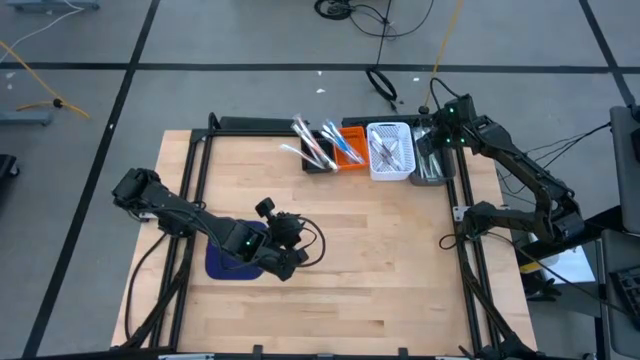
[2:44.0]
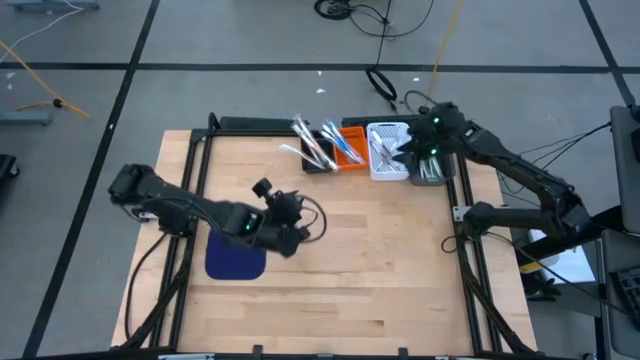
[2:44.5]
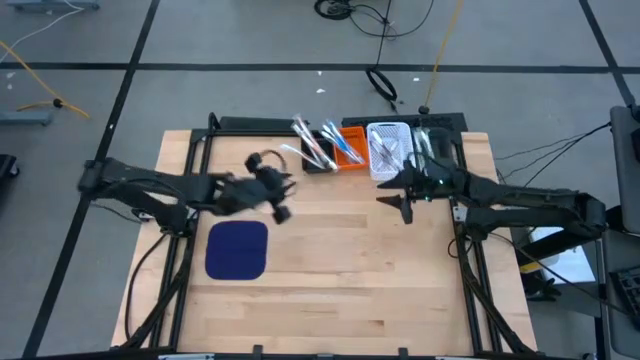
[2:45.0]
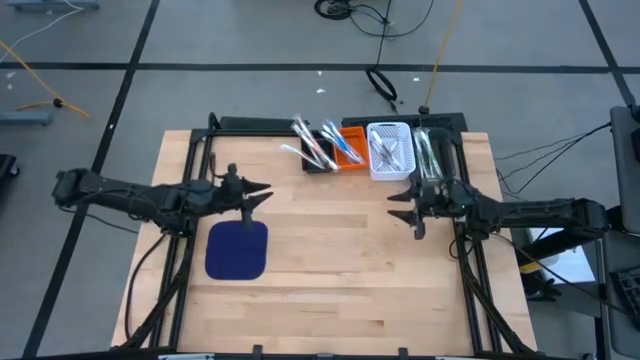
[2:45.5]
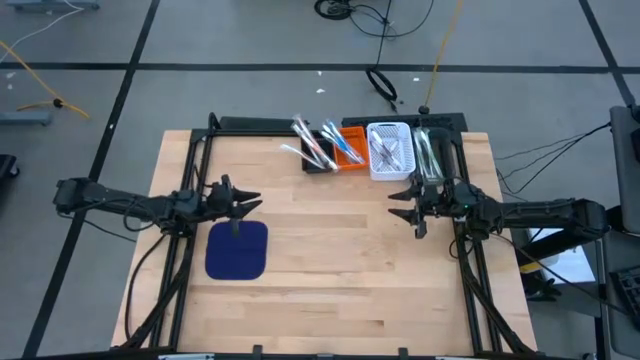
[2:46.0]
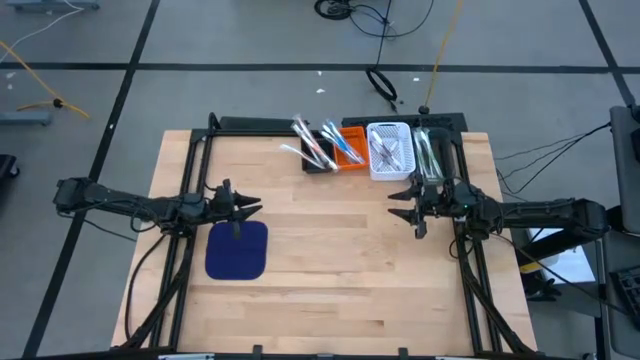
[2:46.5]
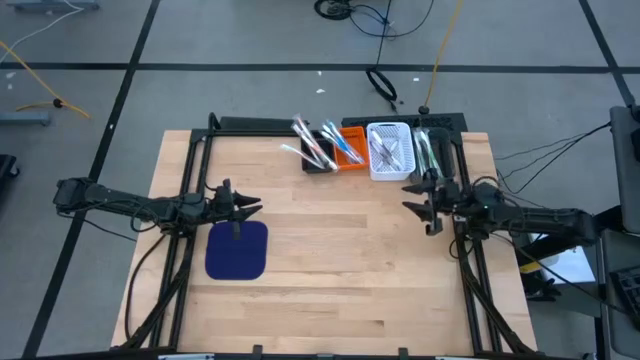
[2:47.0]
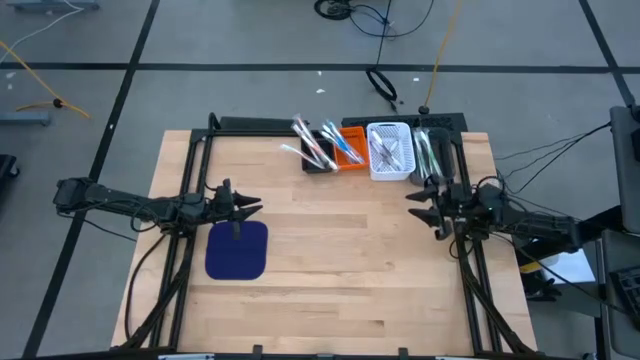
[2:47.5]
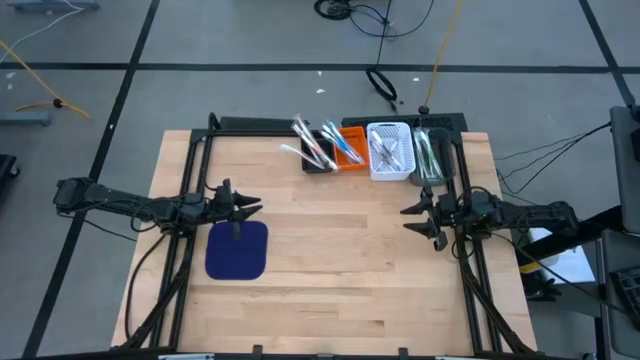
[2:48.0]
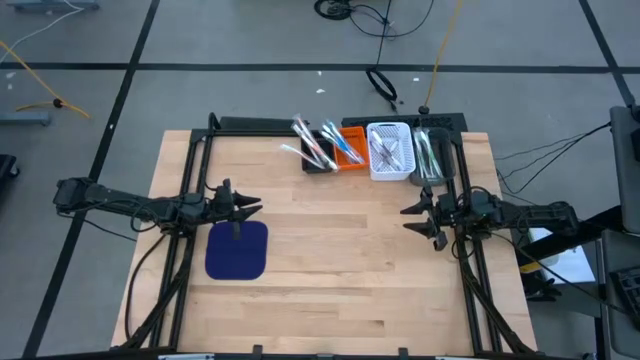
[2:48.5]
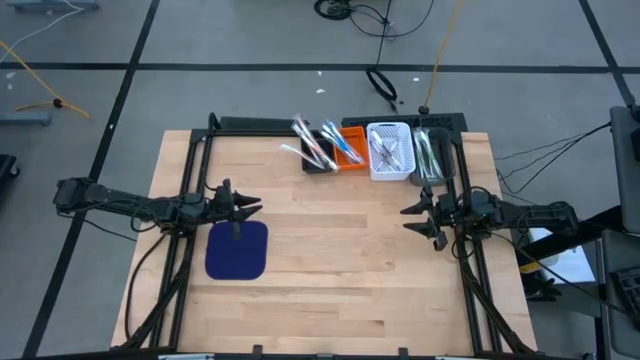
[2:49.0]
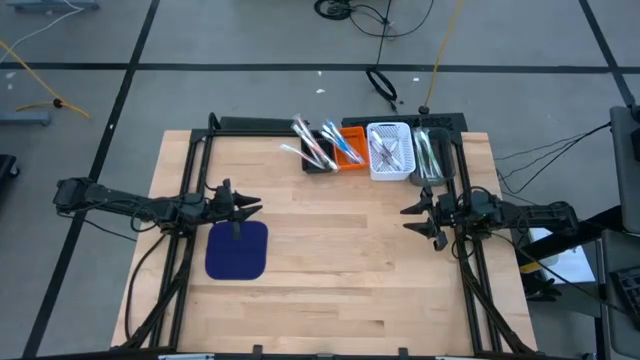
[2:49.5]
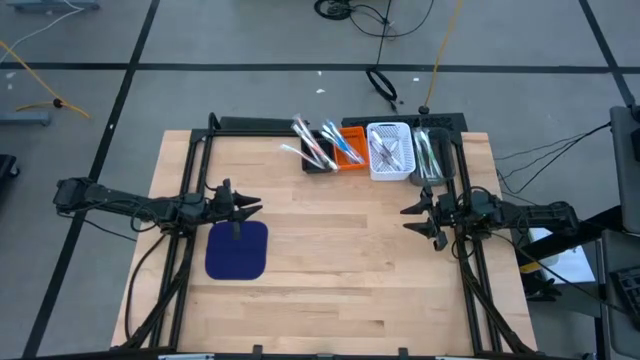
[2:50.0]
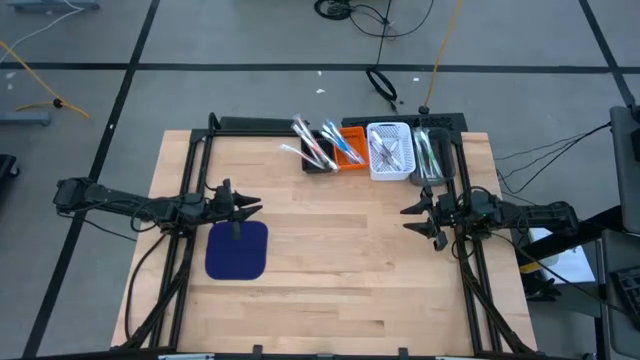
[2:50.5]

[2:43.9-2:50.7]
Task: Pick & Place Toothbrushes
Return to Home Position

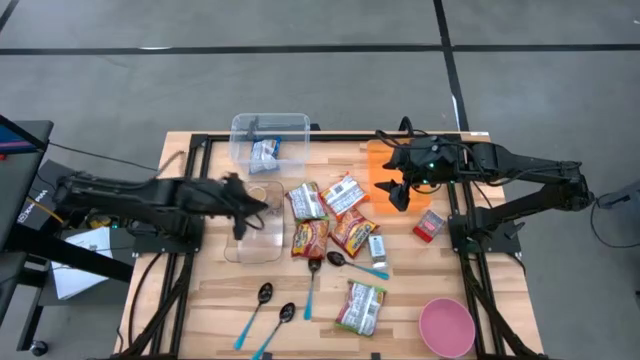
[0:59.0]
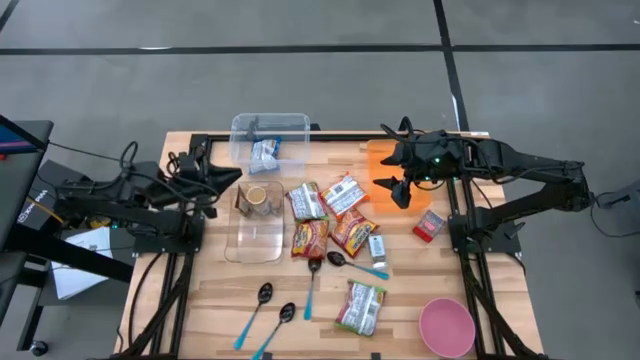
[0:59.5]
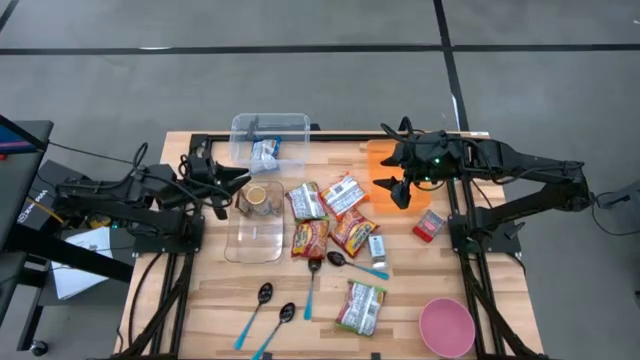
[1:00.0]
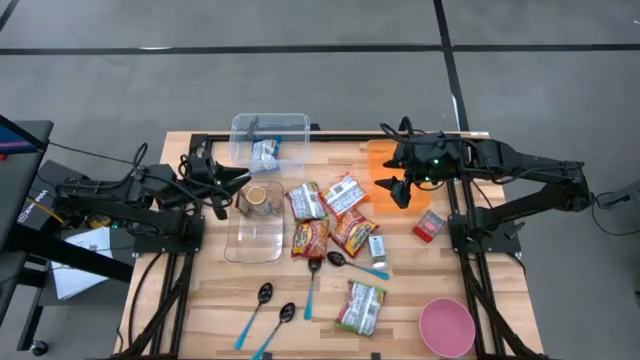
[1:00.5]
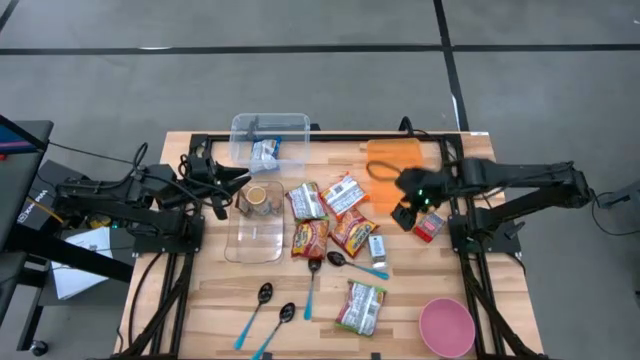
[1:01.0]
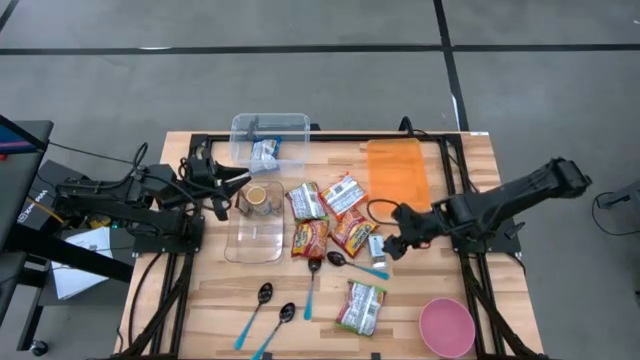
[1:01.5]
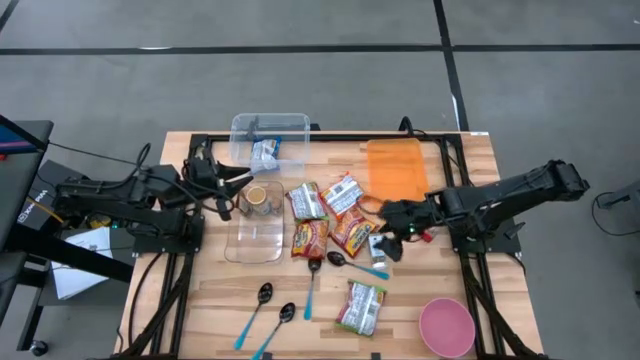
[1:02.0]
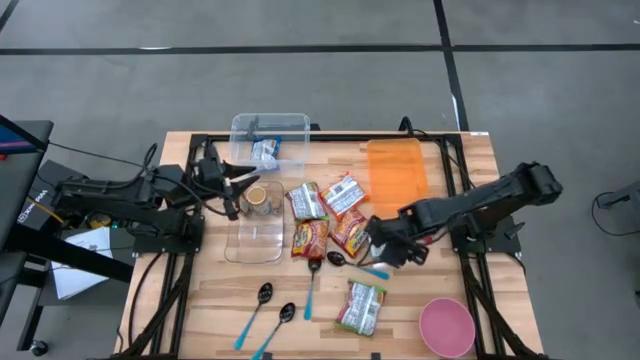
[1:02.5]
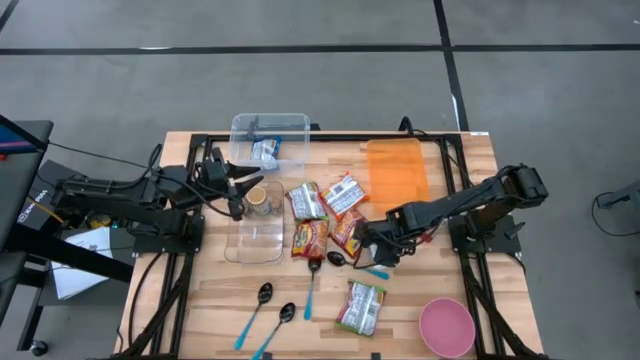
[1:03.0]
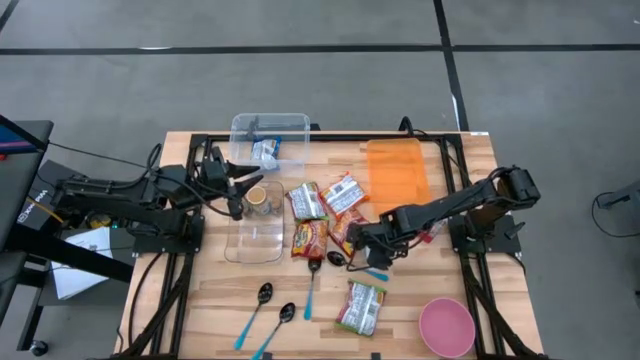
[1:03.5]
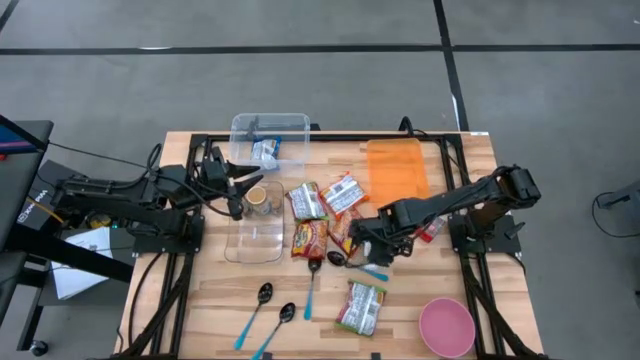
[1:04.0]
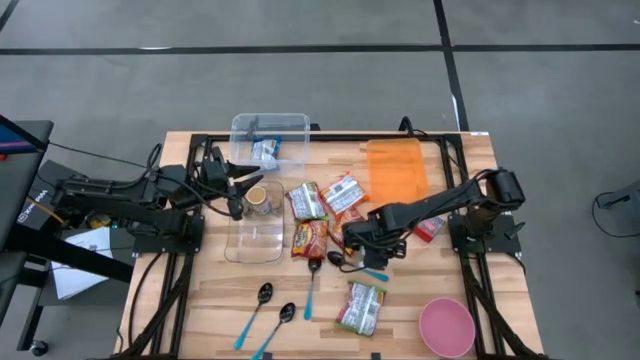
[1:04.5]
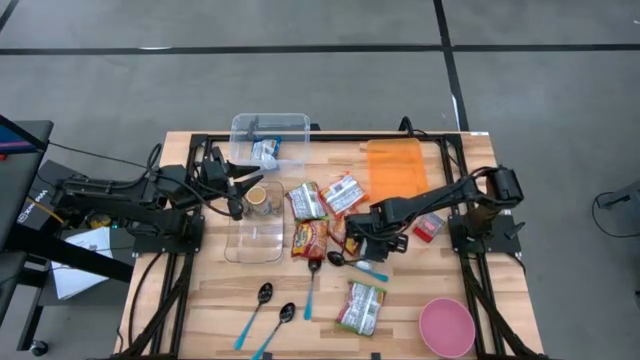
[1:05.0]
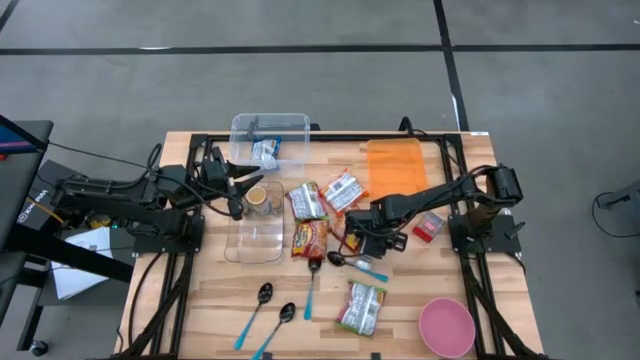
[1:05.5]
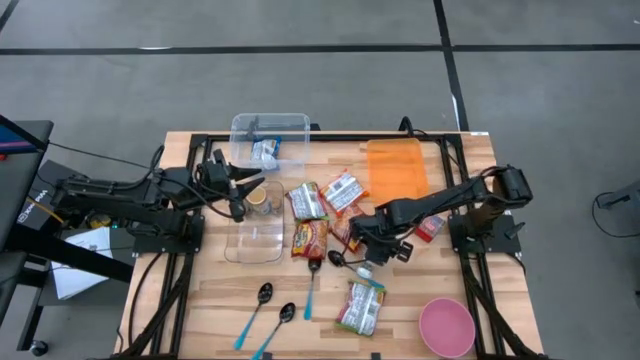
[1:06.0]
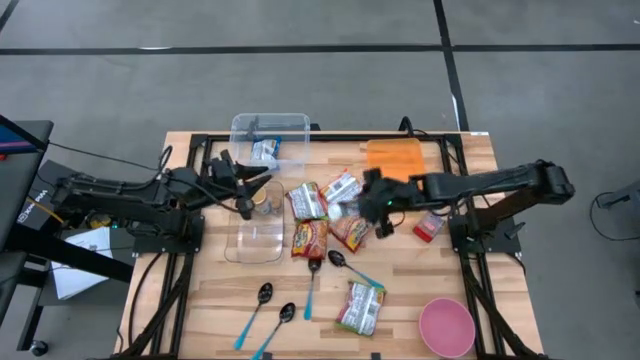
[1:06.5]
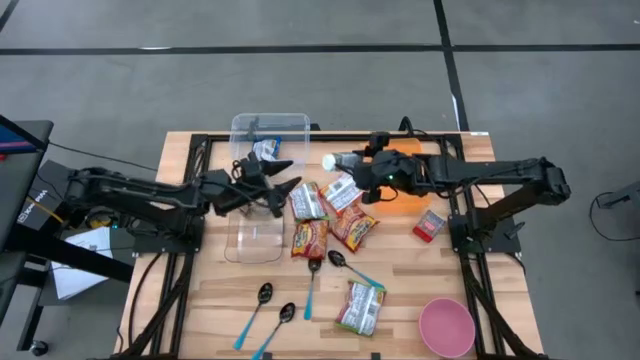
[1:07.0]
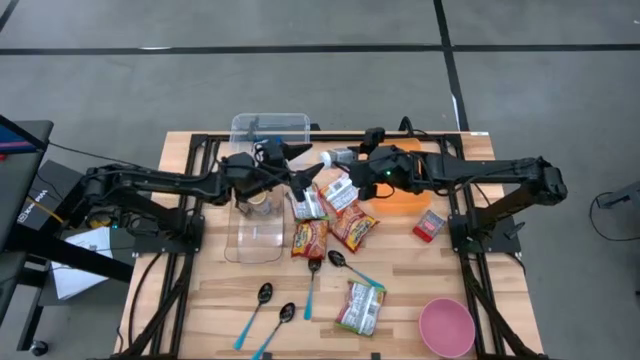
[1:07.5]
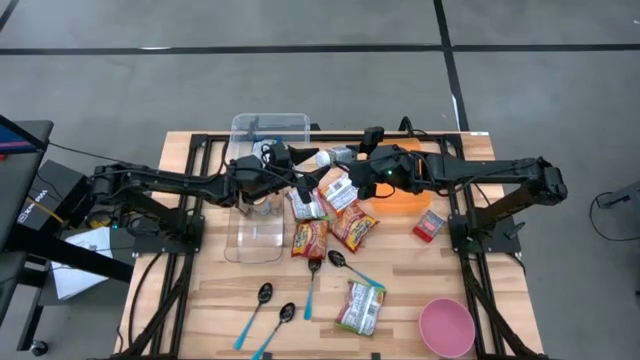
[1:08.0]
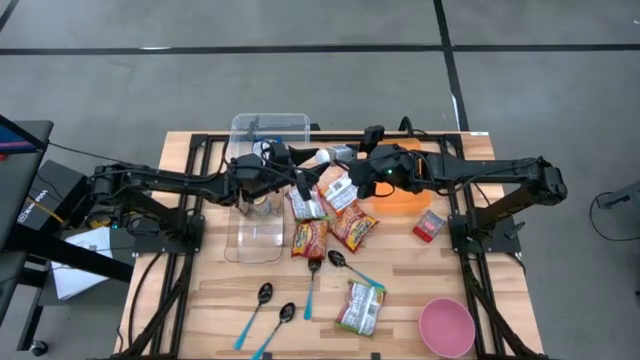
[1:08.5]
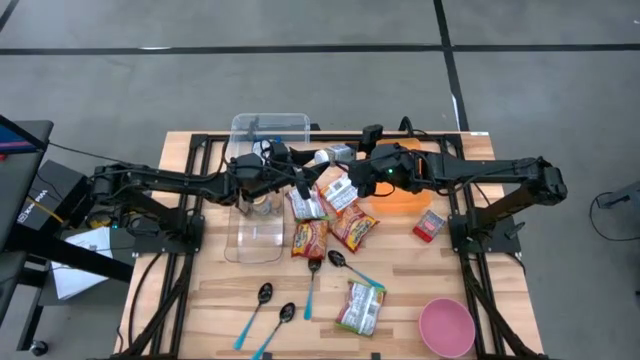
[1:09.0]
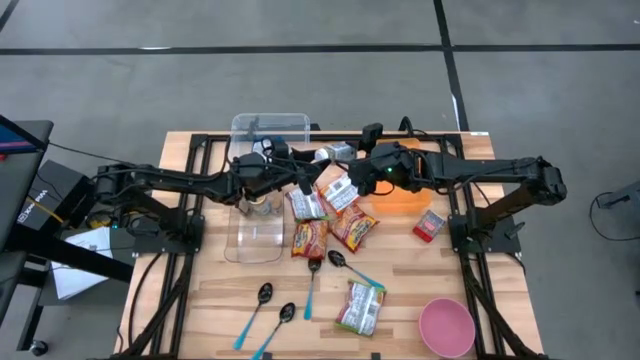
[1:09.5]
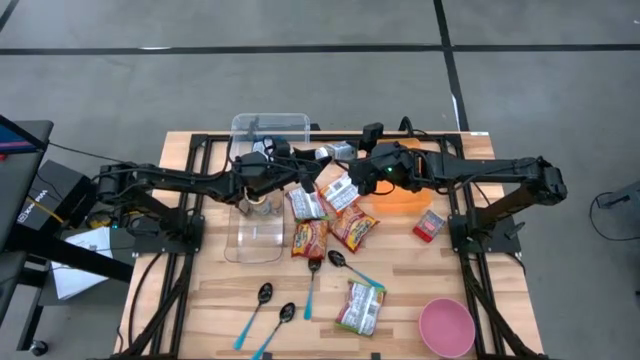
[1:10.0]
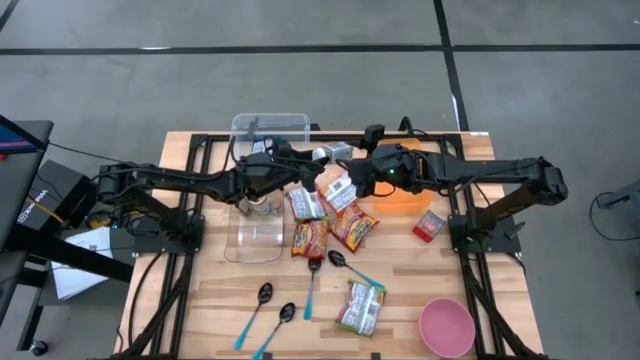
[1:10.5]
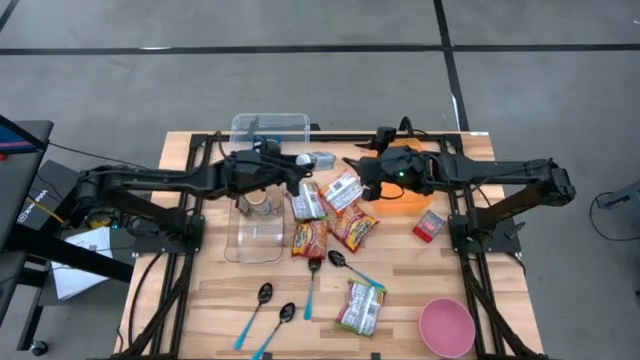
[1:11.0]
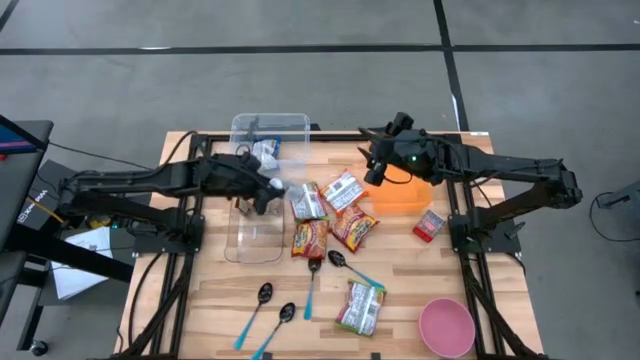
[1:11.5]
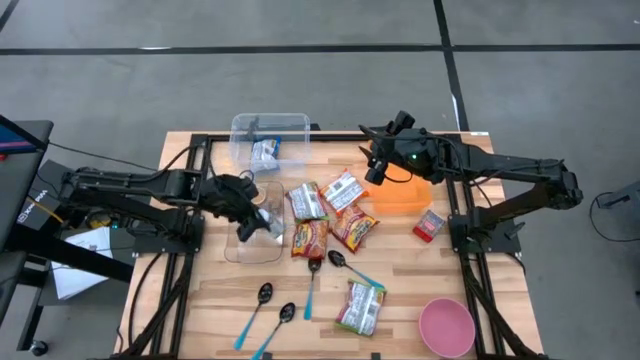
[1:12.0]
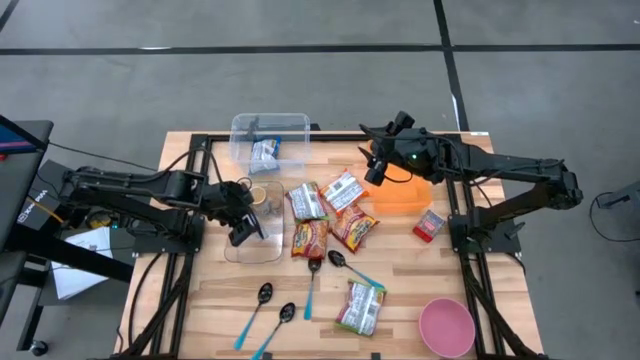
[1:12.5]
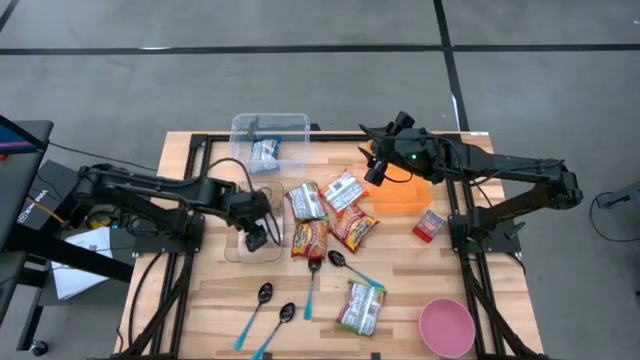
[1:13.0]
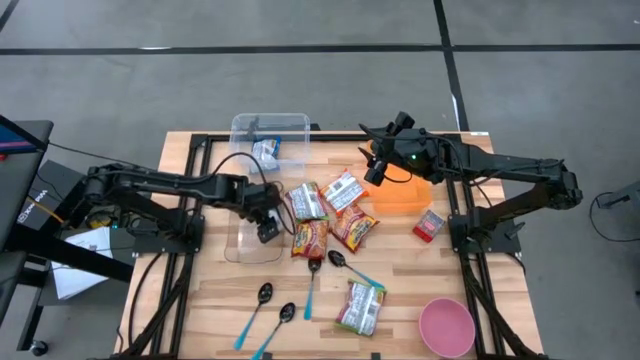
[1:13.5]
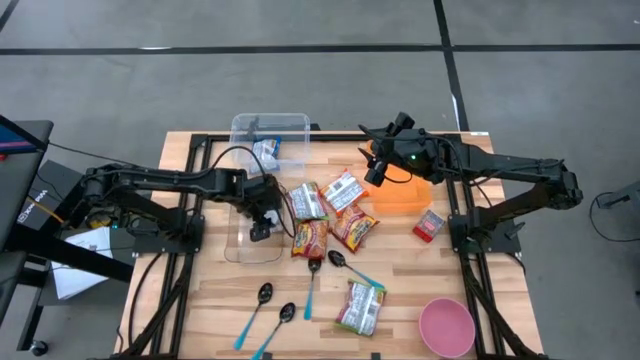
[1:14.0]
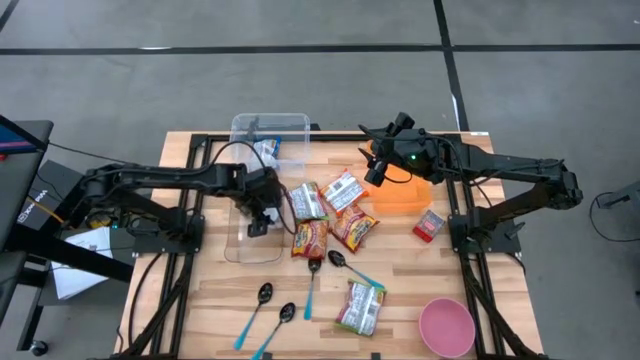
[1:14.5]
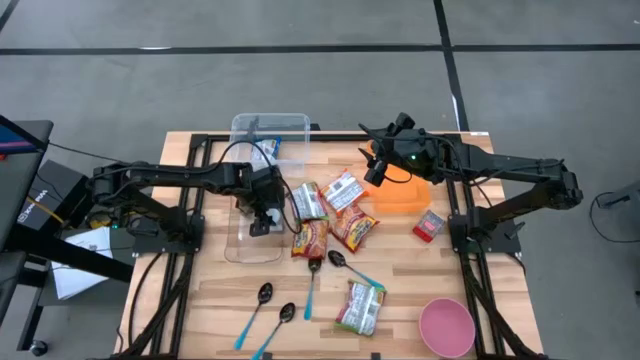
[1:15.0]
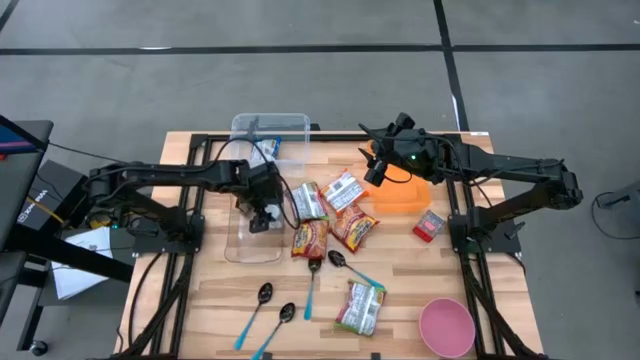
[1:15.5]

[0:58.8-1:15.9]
Task: Pick & Place Food Item
Put the white seasoning bottle into the transparent bin
